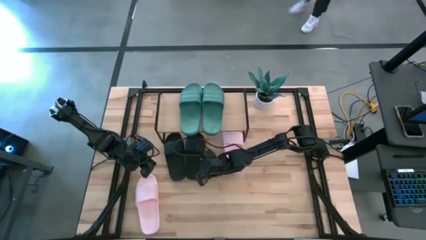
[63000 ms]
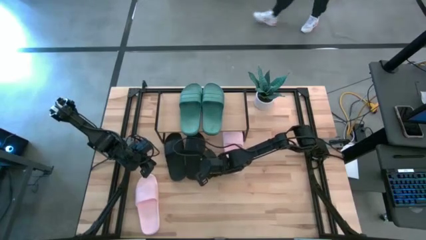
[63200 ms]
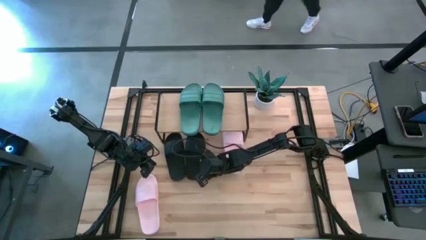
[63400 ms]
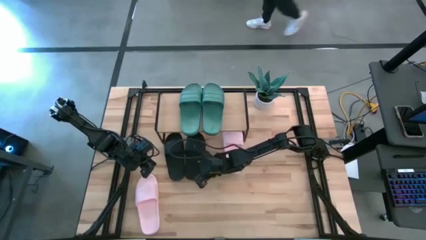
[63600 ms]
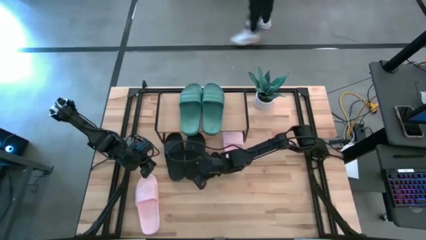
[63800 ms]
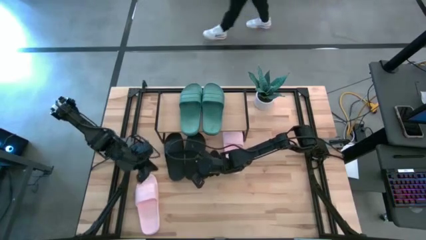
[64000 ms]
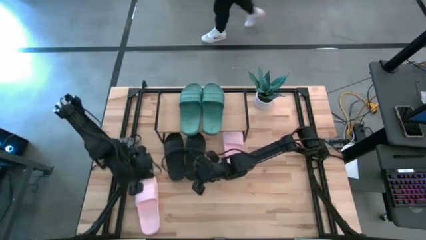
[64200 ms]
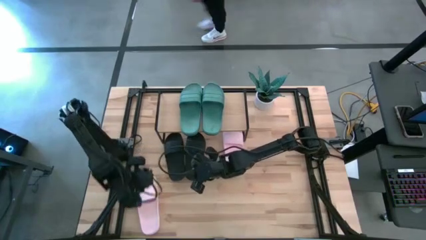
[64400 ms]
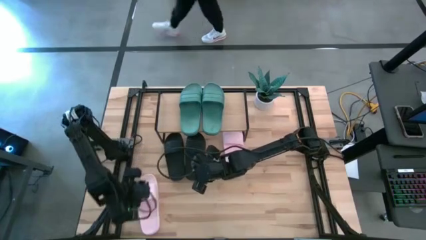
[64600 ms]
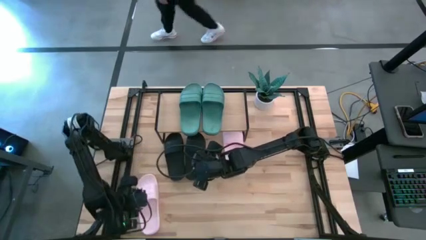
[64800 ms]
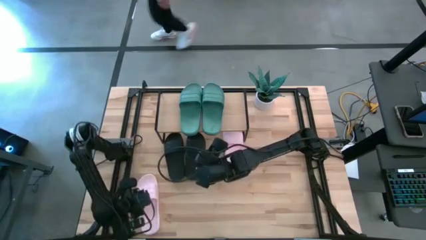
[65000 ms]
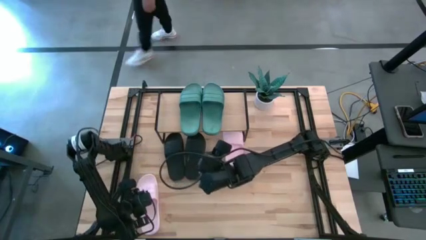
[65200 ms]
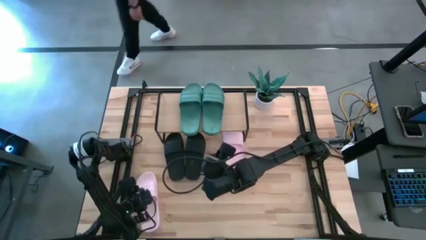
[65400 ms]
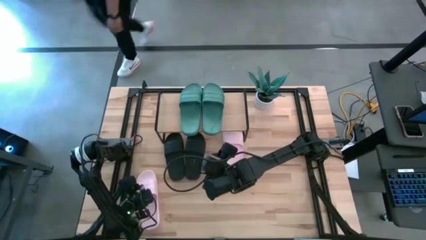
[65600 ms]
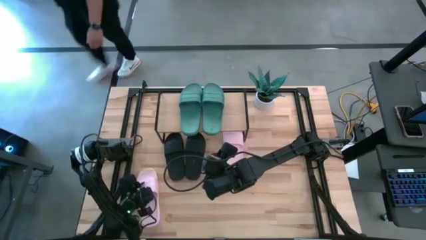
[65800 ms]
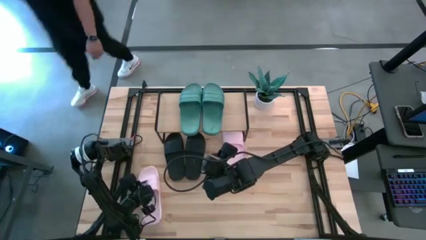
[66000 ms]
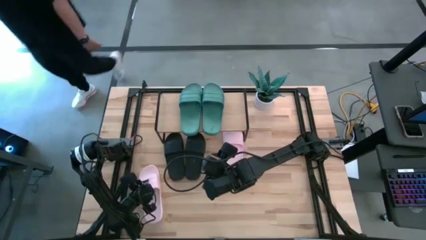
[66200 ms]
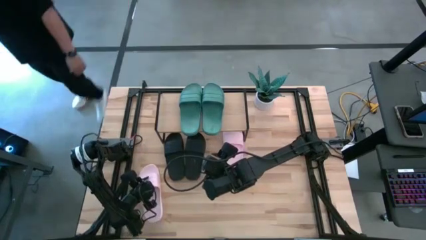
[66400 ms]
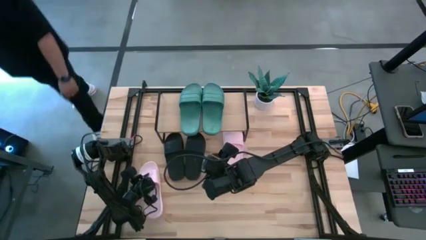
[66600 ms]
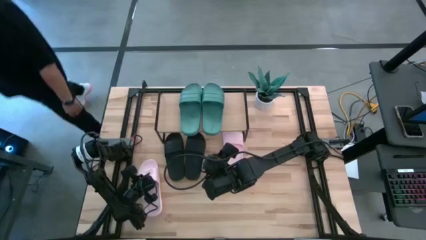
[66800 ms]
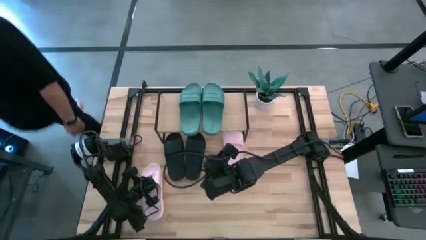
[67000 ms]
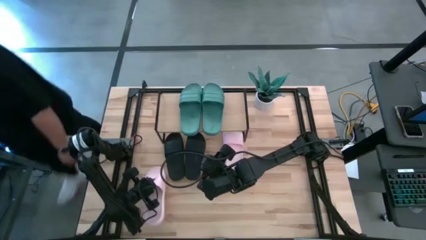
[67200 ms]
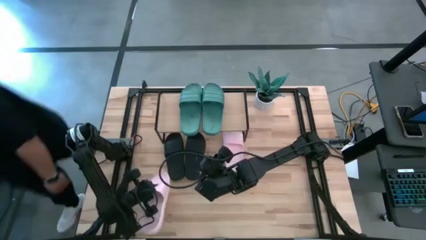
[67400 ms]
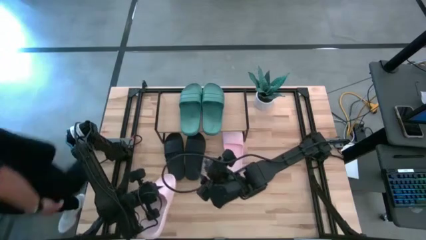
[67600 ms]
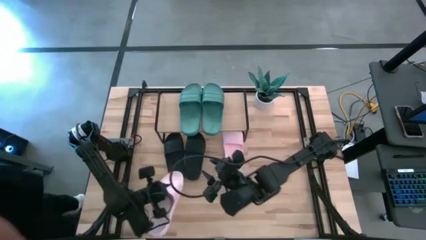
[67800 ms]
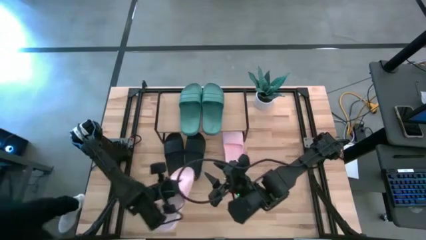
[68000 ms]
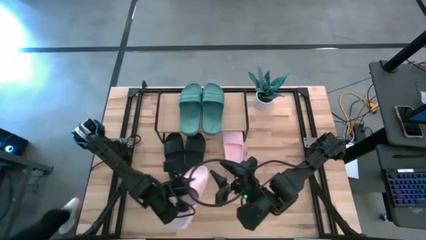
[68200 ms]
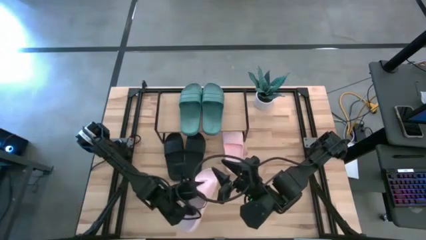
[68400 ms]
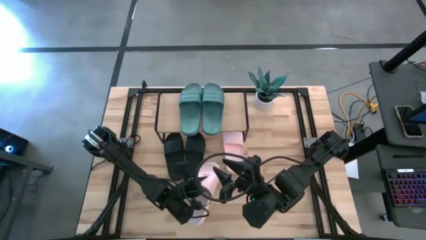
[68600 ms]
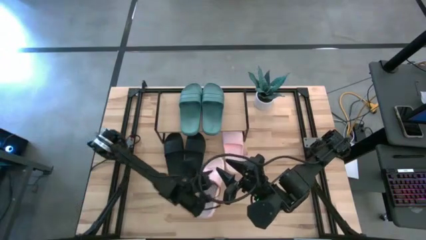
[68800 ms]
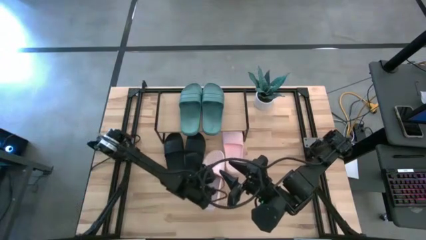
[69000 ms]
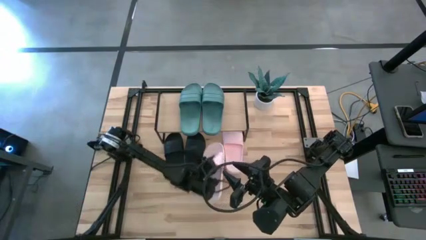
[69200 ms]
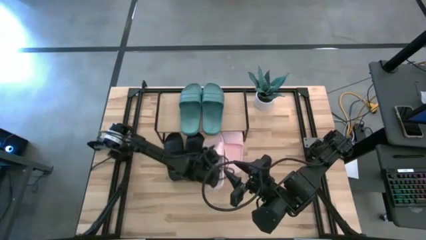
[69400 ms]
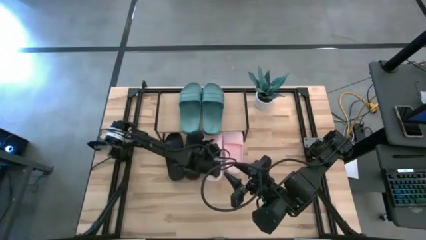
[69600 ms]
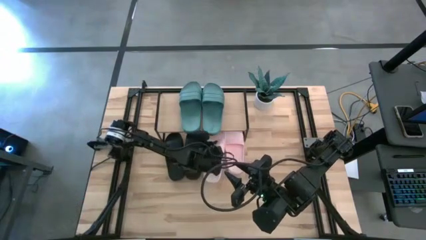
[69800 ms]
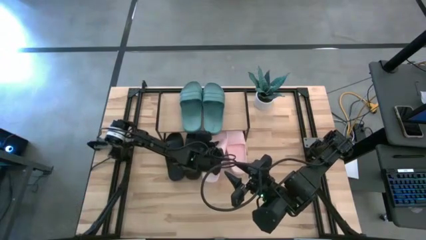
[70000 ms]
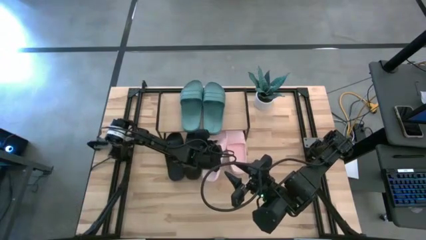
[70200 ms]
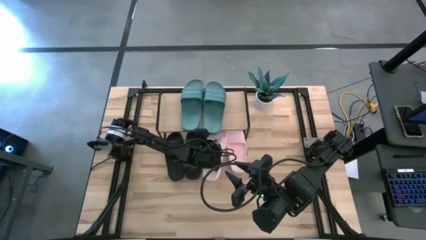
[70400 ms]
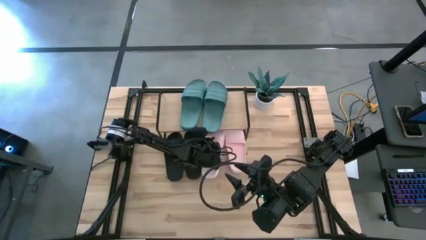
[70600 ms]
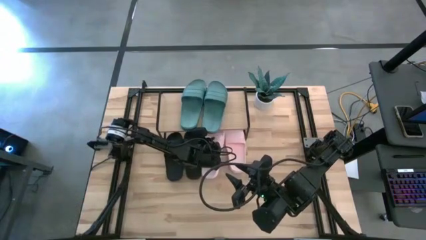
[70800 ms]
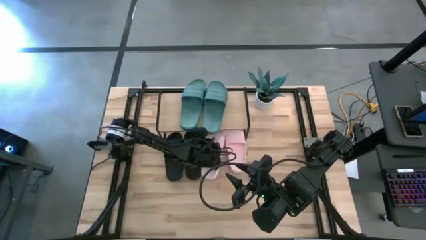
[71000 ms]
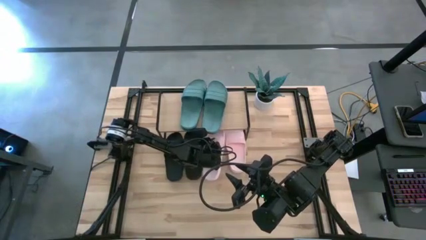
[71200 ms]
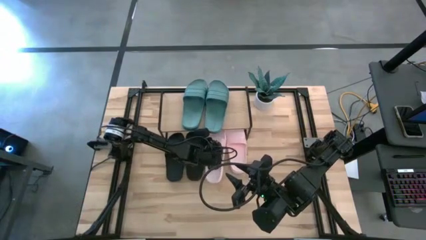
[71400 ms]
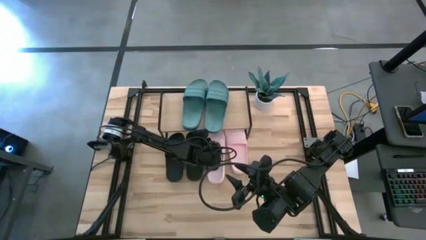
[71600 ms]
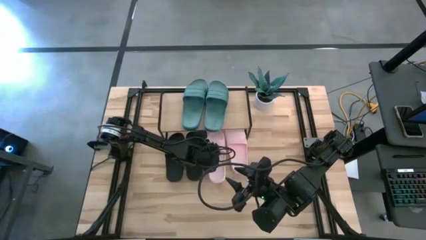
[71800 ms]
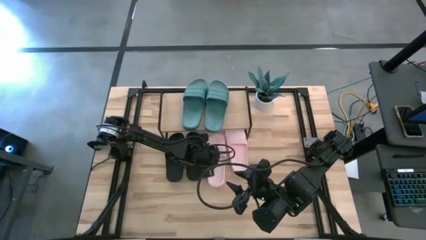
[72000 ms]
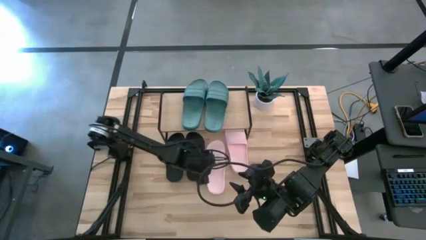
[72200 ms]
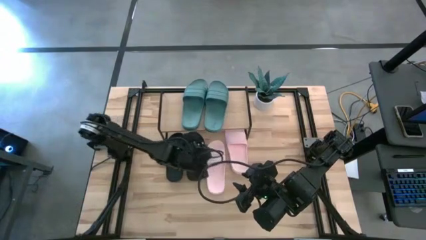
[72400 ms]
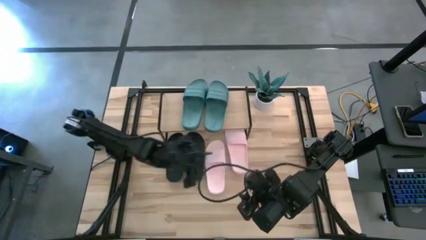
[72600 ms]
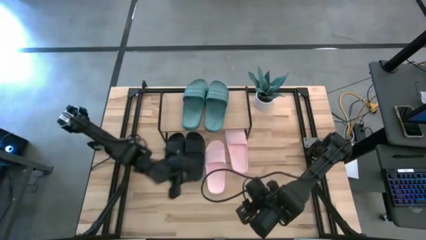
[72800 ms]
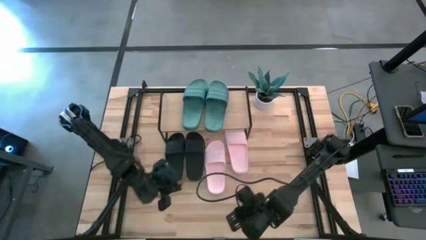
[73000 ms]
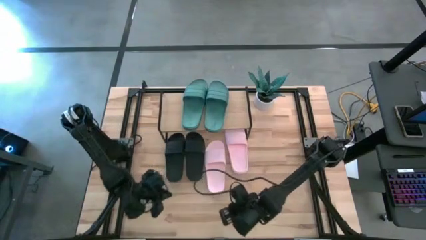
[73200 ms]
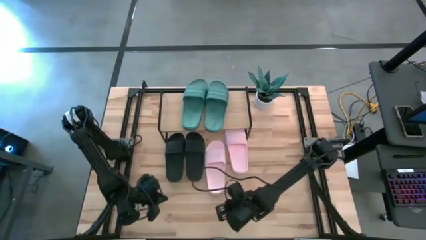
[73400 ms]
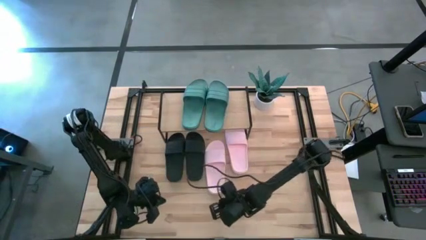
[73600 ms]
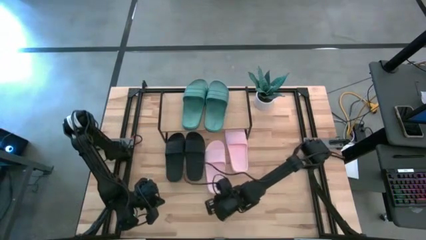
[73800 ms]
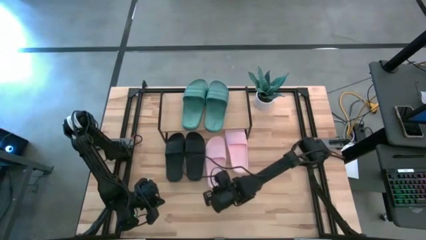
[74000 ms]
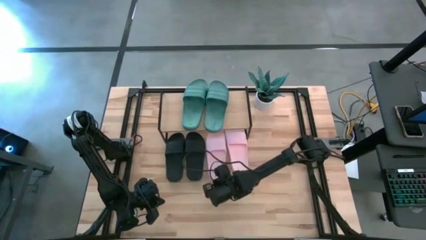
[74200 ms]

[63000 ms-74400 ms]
Task: Pick and place slides into the shelf
Put the pink slide under the shelf
